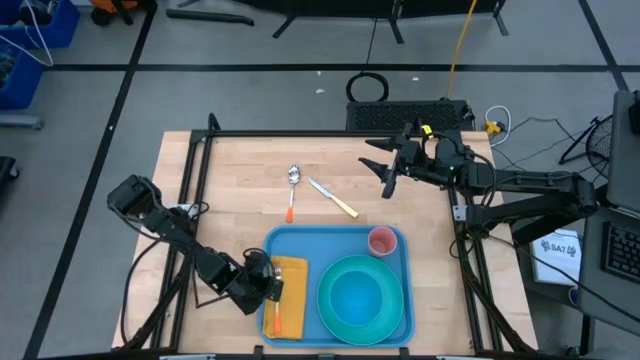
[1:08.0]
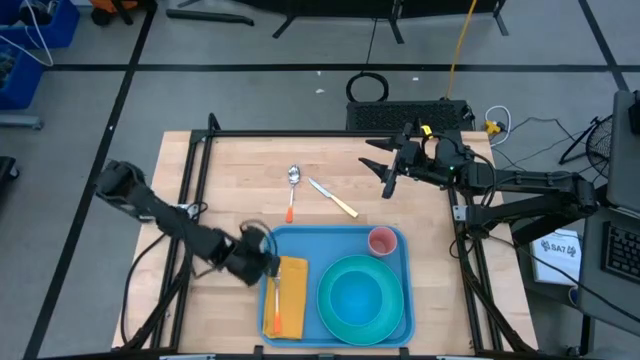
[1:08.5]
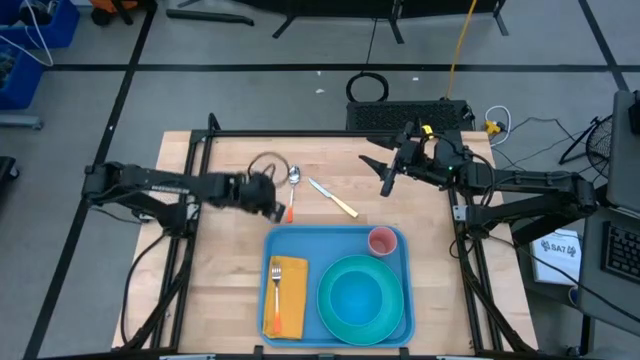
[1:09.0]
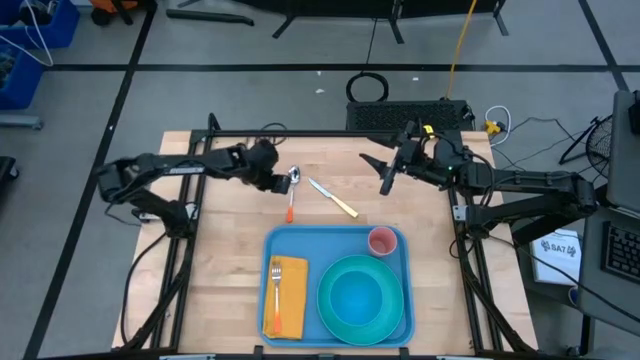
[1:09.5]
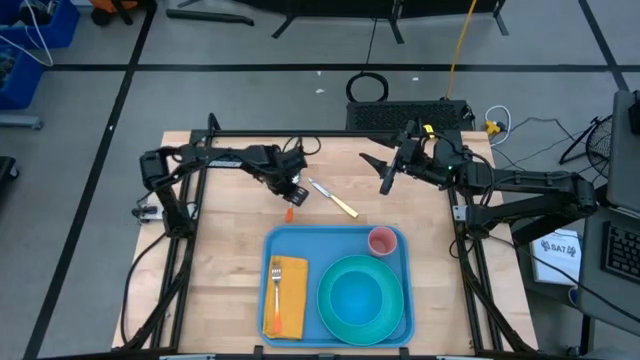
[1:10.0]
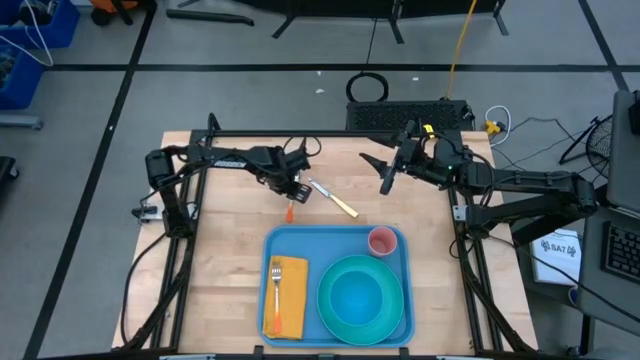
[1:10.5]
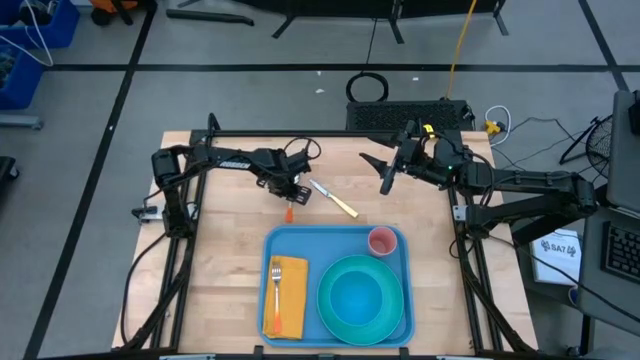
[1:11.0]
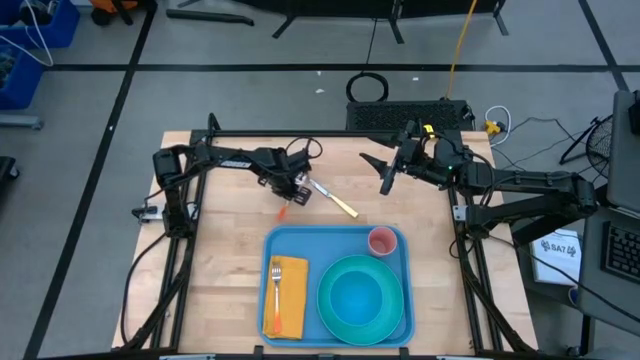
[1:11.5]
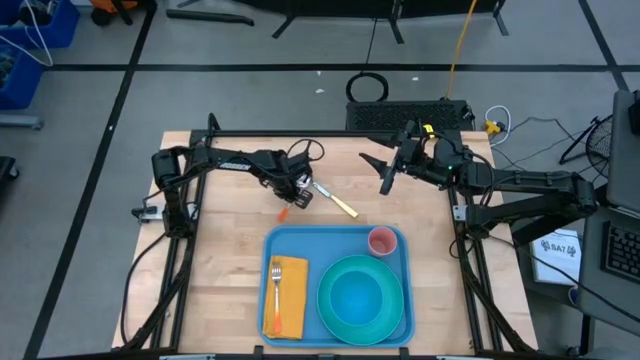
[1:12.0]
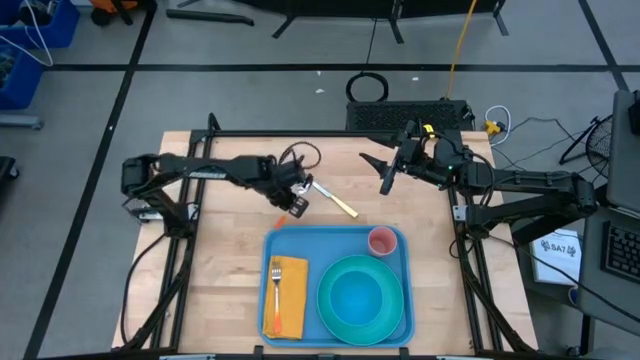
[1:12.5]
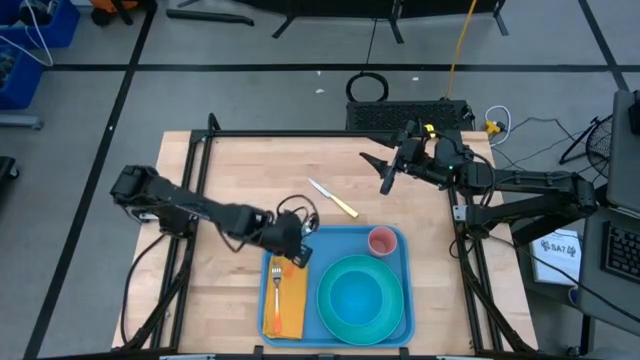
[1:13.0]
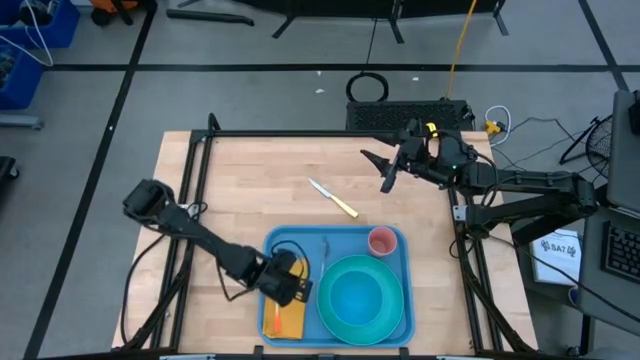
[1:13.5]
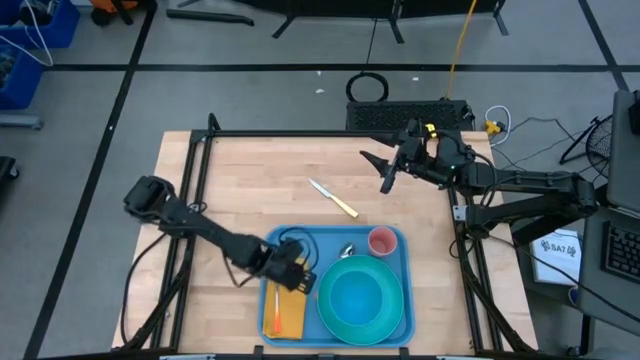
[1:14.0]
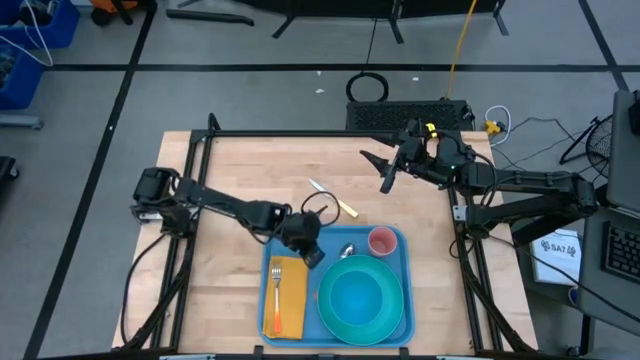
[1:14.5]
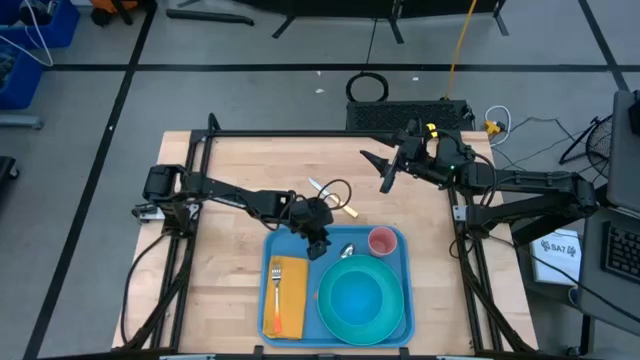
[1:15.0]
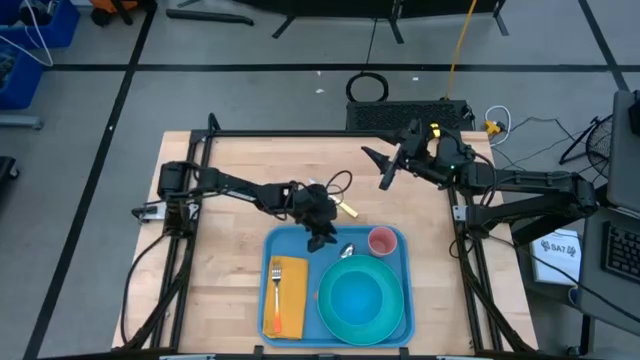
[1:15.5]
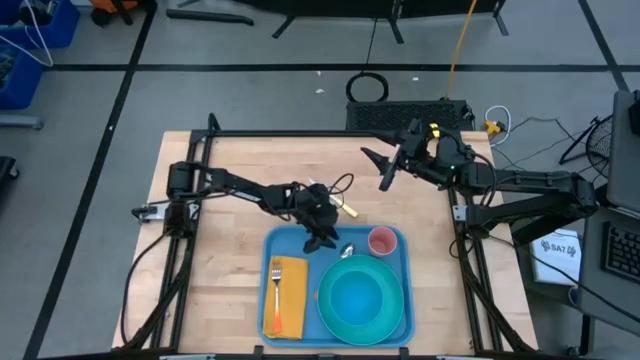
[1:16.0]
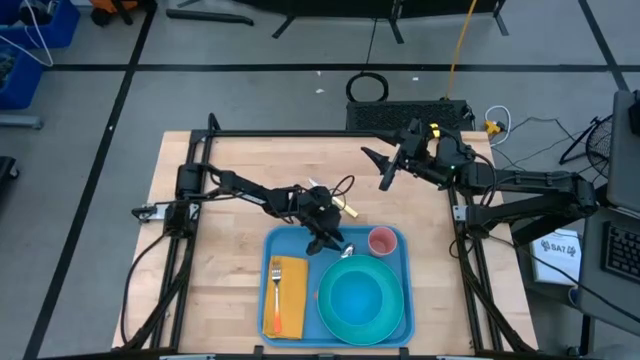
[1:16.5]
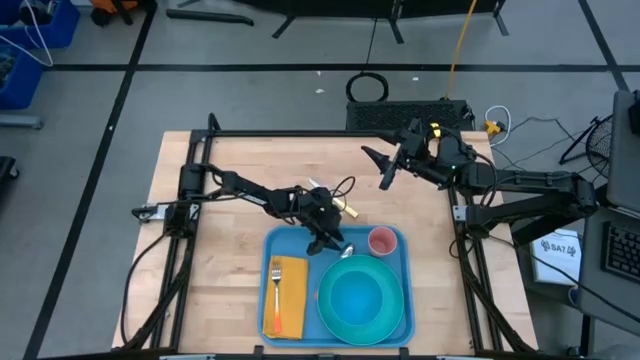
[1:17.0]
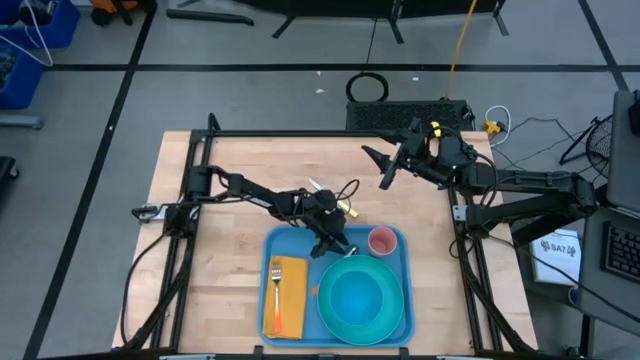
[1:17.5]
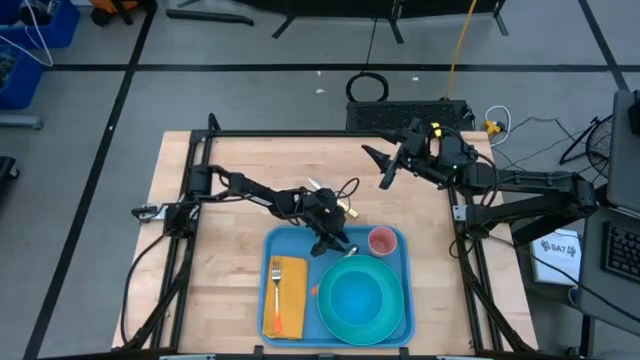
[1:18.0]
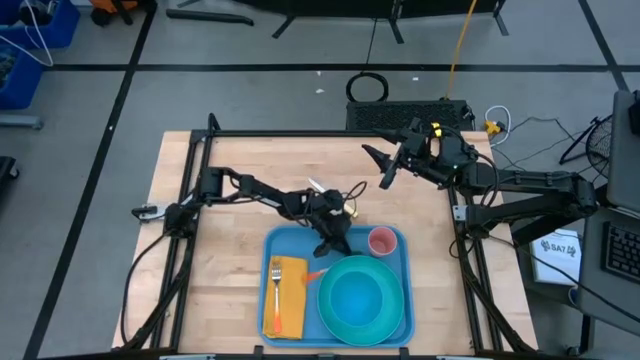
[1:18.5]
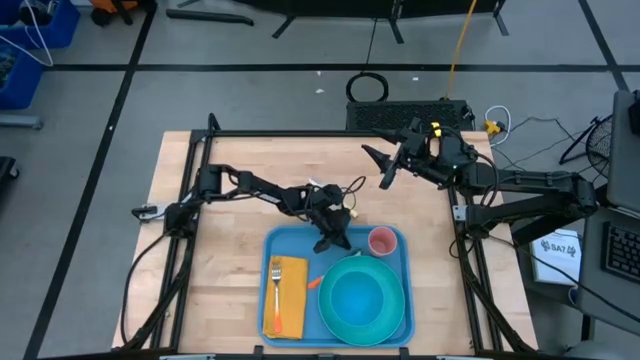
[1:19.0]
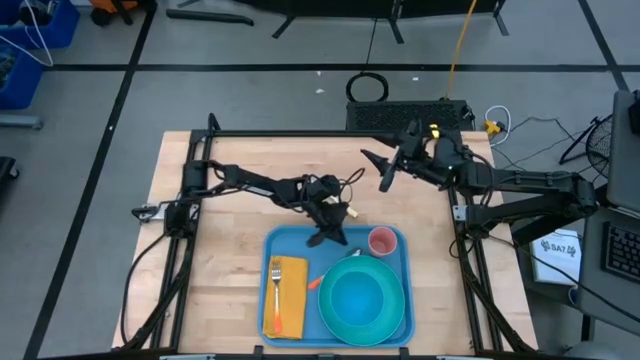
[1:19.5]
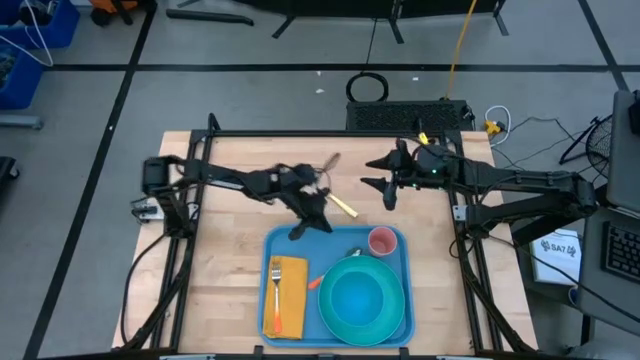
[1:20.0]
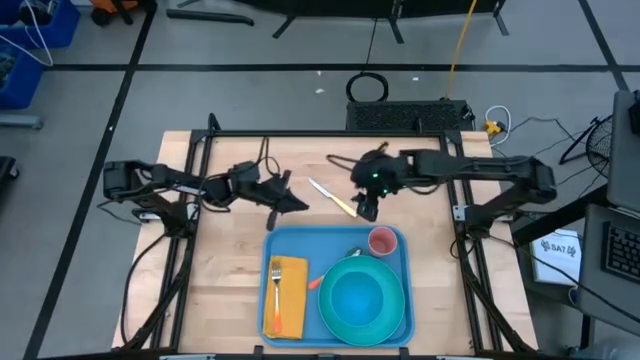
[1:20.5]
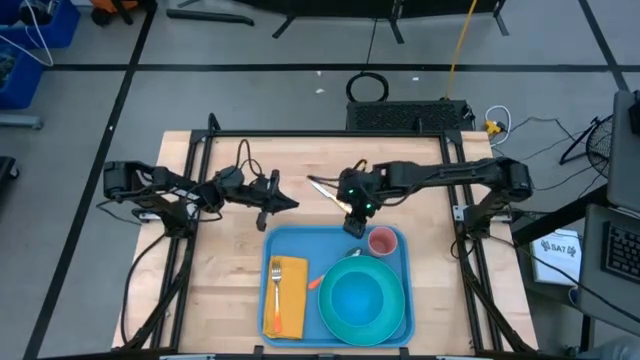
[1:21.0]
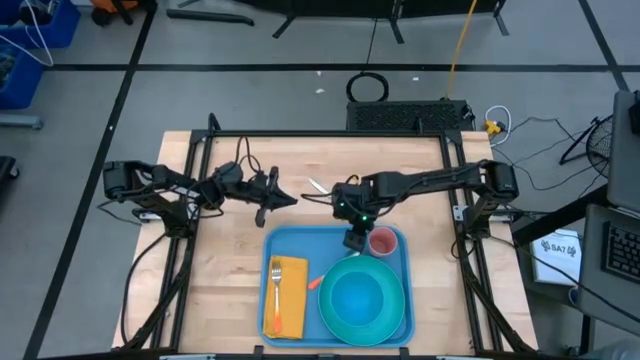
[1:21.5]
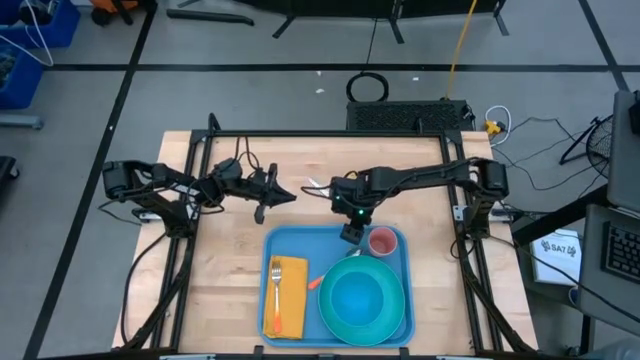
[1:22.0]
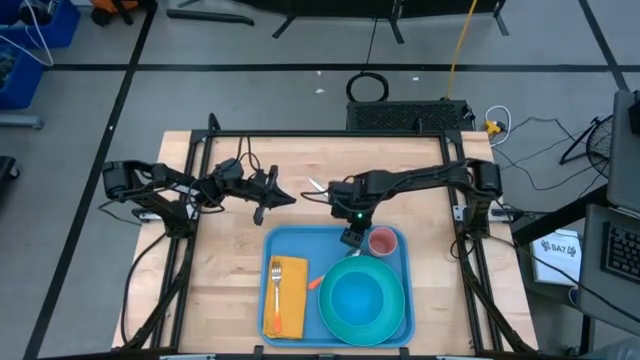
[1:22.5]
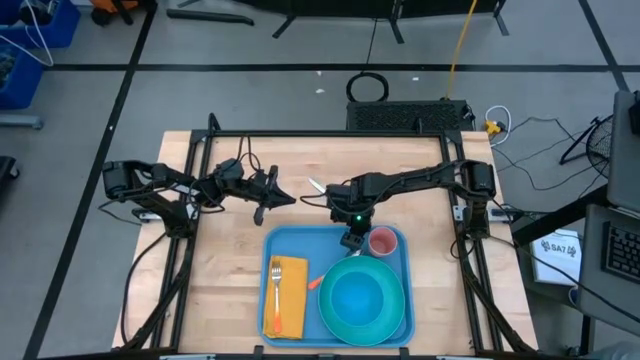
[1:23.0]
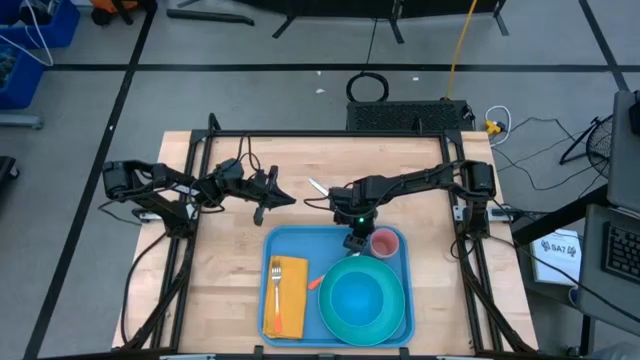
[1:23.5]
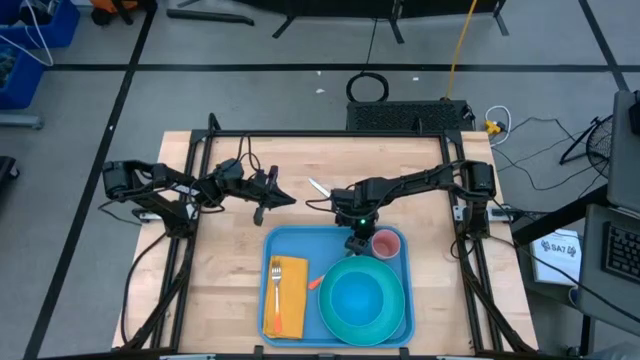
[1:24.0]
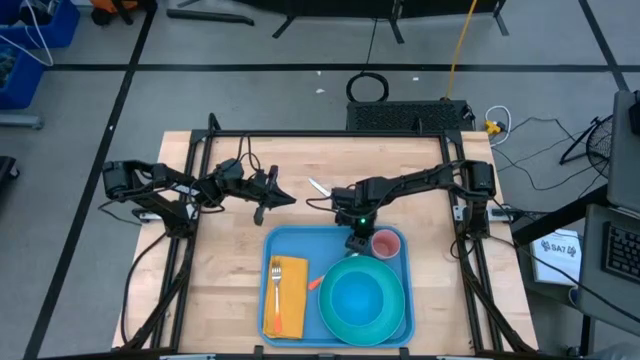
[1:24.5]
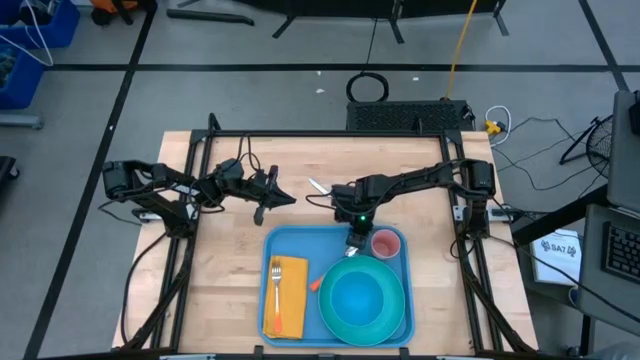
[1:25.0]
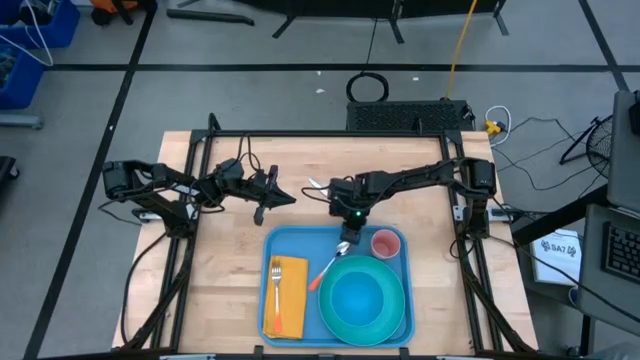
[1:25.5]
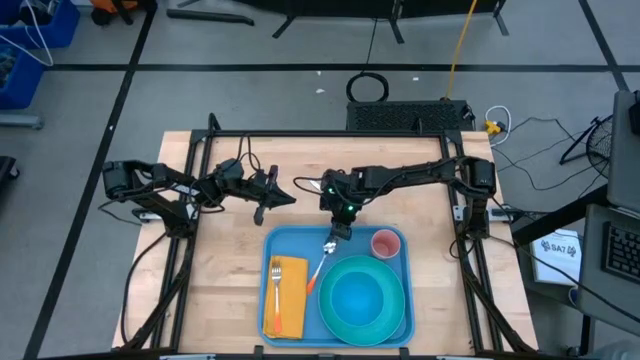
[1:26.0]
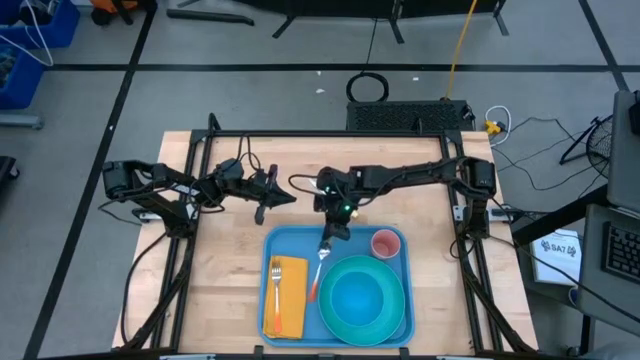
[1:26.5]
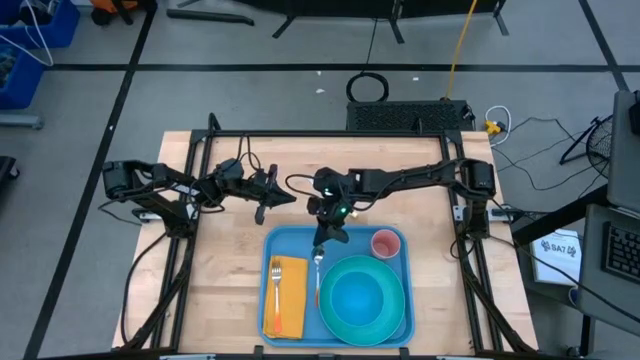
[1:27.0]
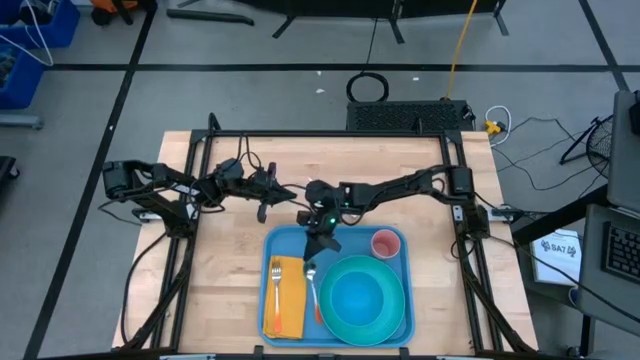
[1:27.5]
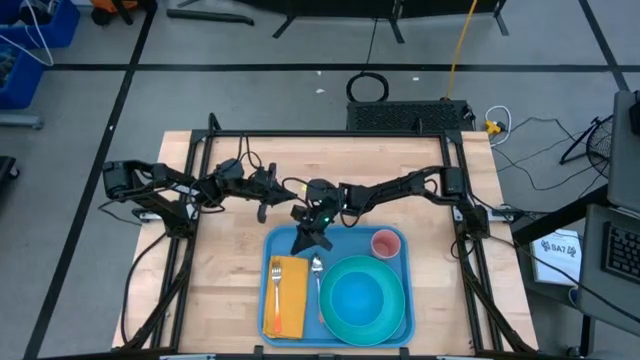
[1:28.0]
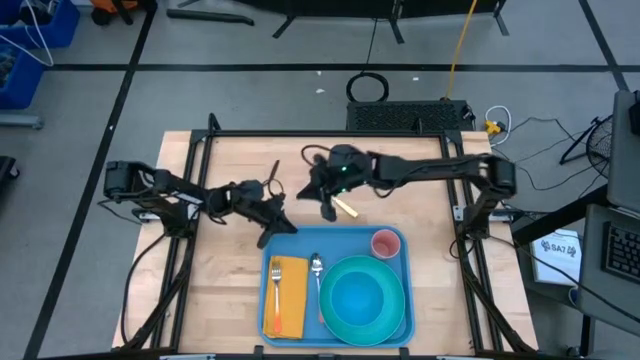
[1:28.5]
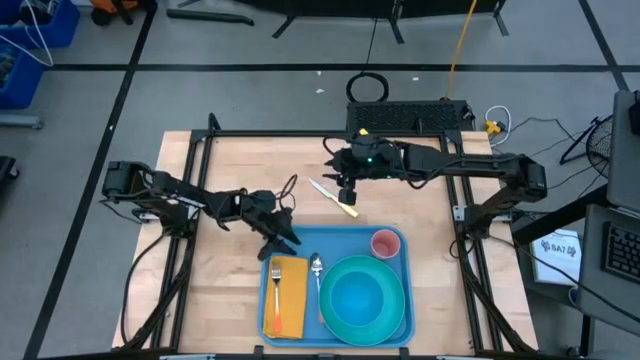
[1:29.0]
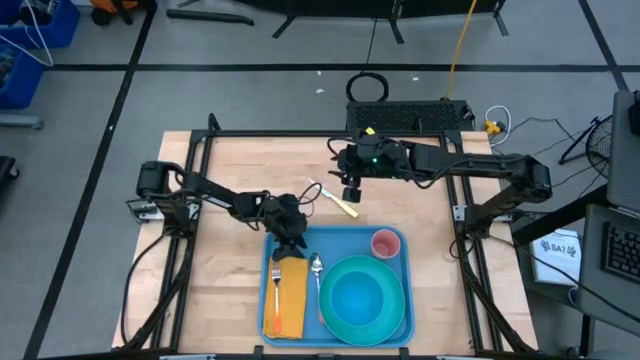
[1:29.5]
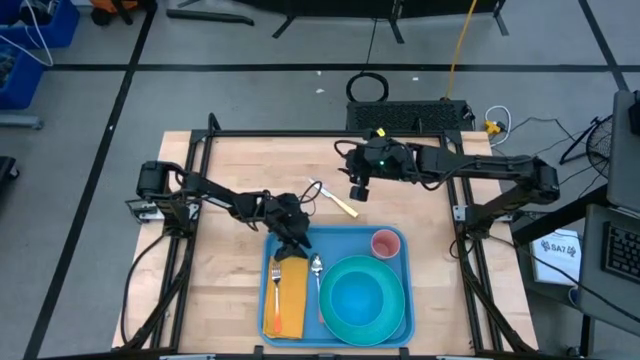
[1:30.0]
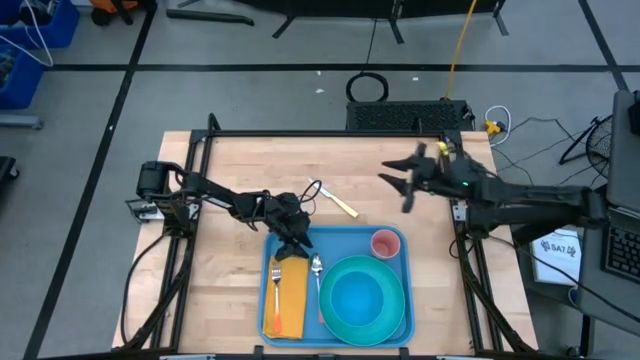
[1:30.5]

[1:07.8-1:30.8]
Task: Set up tray
Put the orange spoon on top of the yellow table napkin
